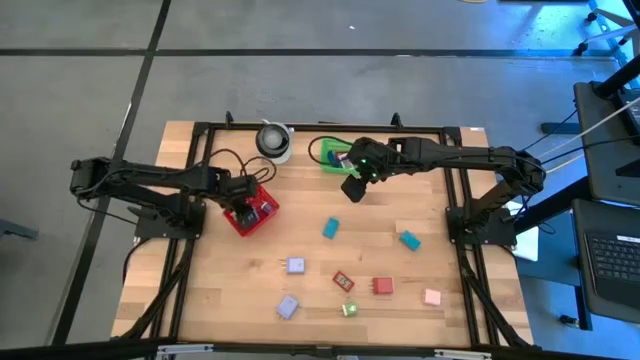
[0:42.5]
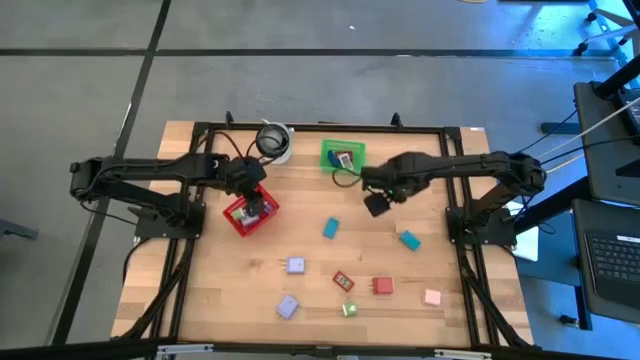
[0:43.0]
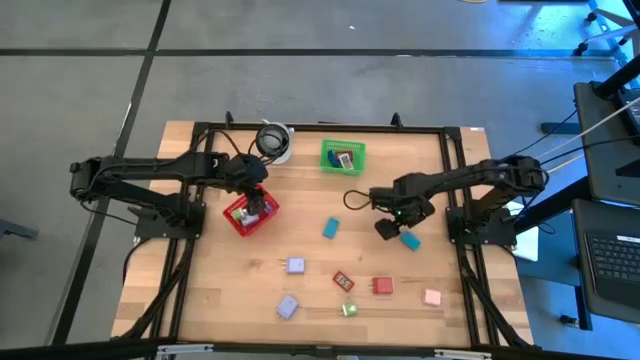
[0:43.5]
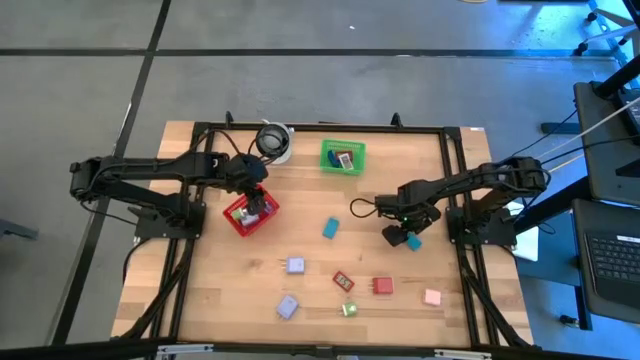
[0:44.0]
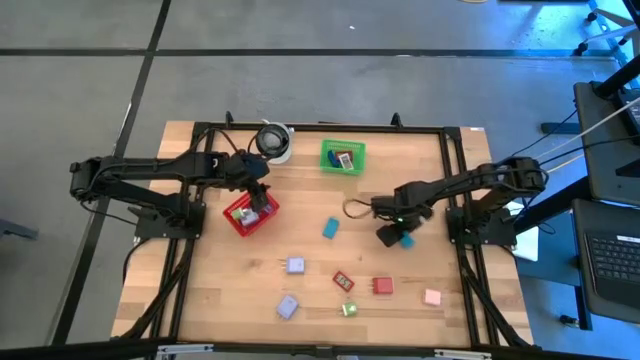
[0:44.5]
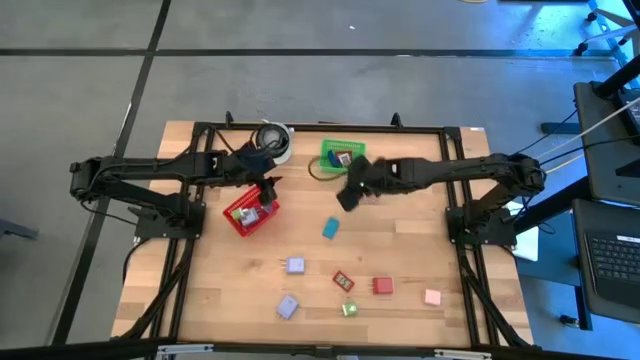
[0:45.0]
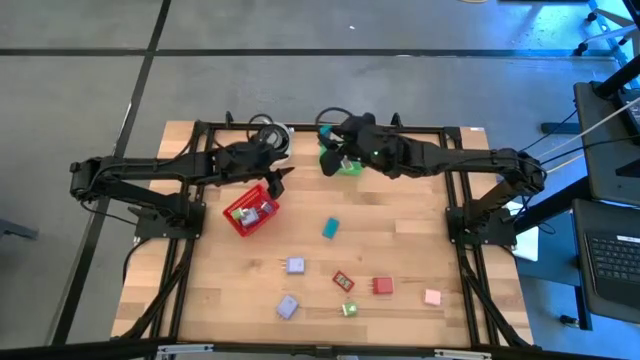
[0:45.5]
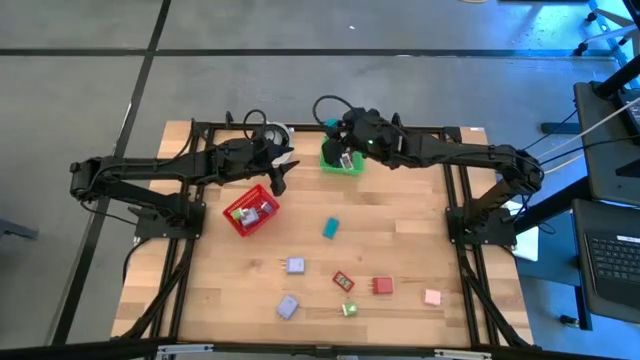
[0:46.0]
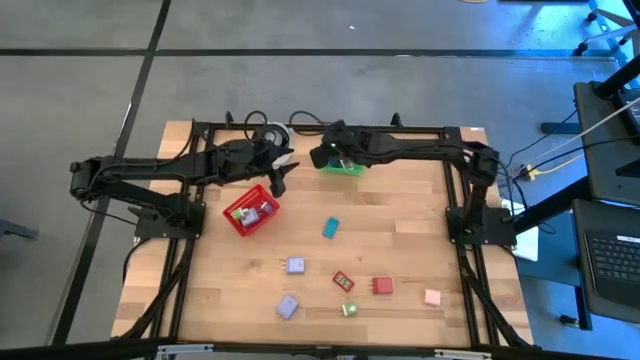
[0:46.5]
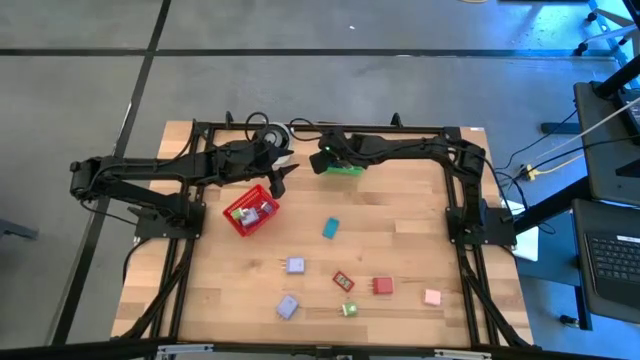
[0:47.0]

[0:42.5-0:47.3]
Task: Pick & Place Office items
Put the right light blue digital clock into the green bin

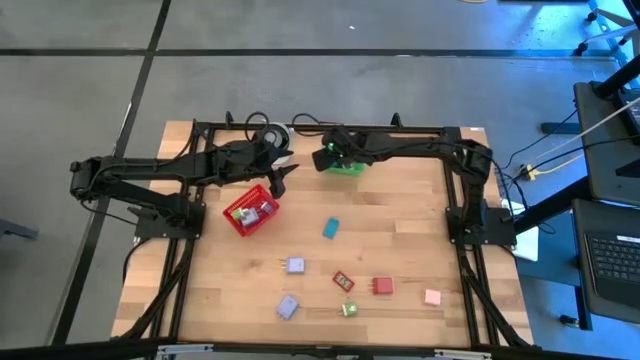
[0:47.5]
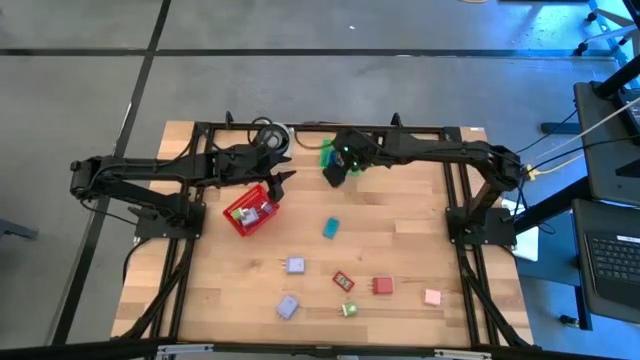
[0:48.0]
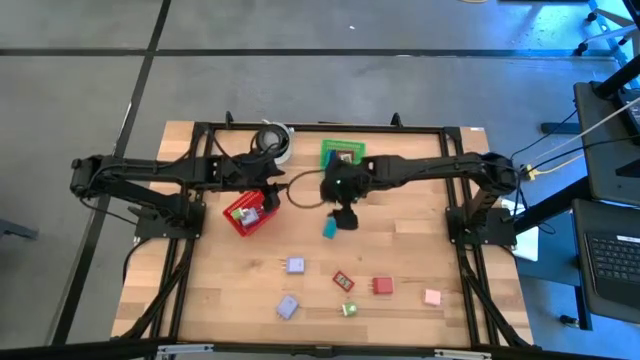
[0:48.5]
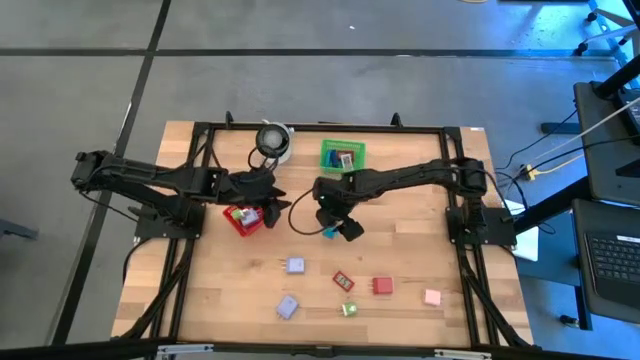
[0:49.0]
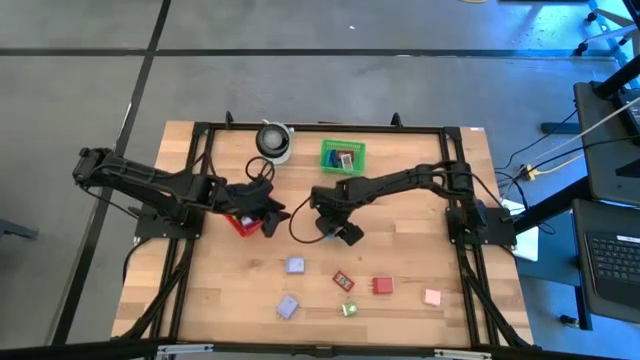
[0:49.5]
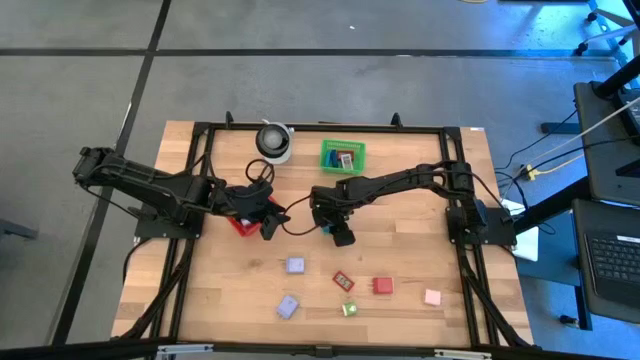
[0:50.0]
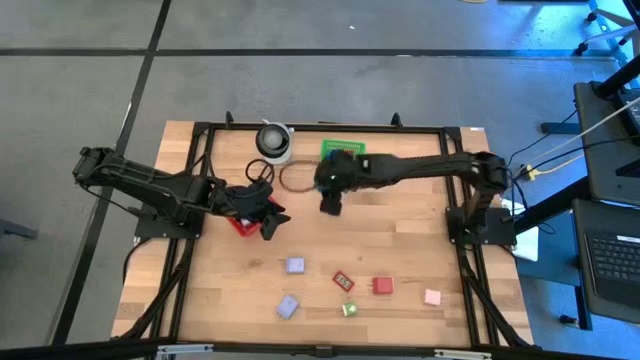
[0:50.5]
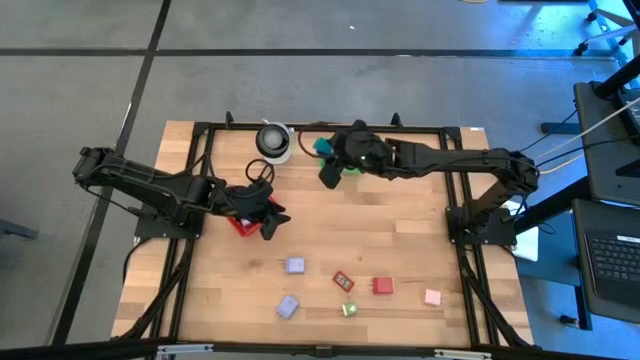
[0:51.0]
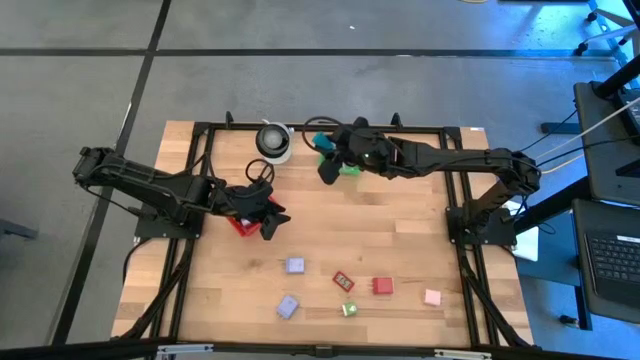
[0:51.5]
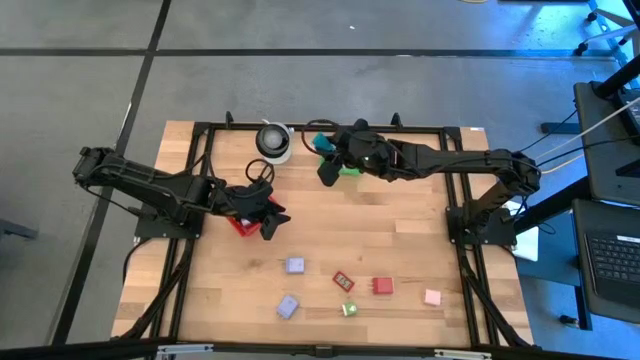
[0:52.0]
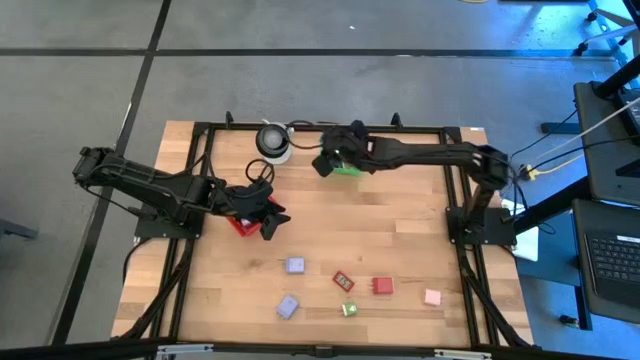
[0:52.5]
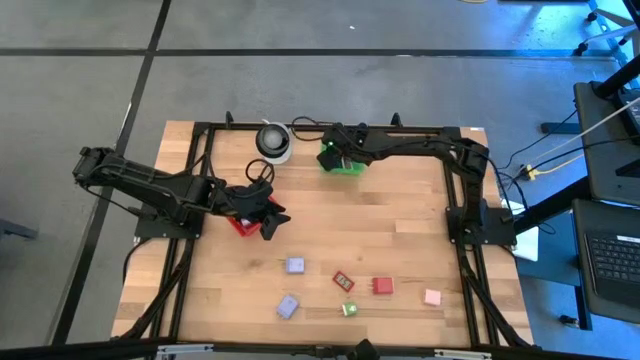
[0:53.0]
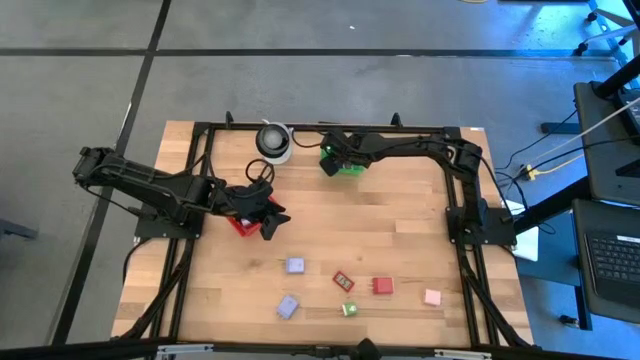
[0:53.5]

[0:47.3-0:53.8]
Put the light blue digital clock into the green bin

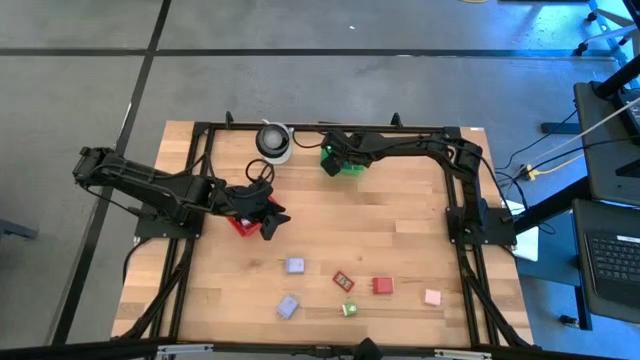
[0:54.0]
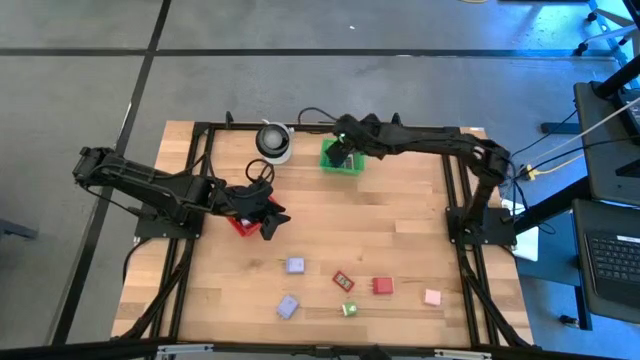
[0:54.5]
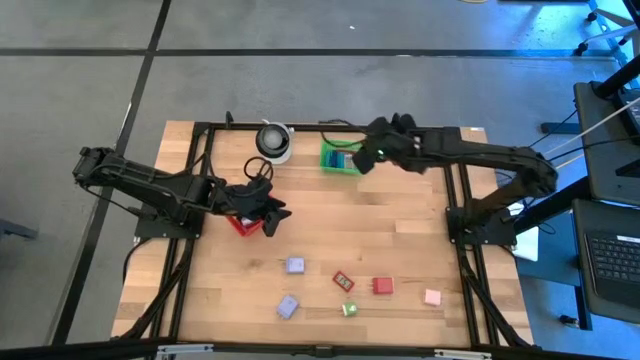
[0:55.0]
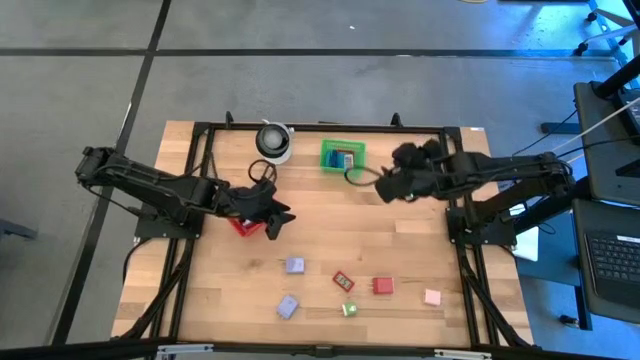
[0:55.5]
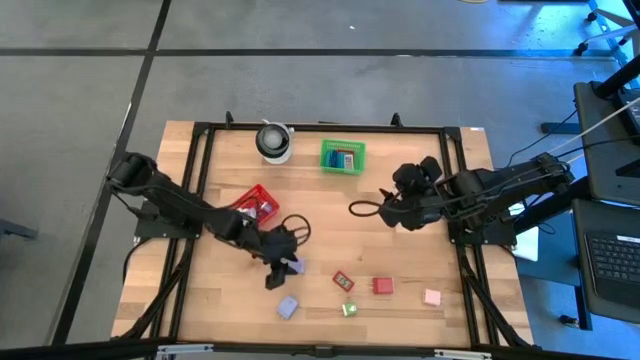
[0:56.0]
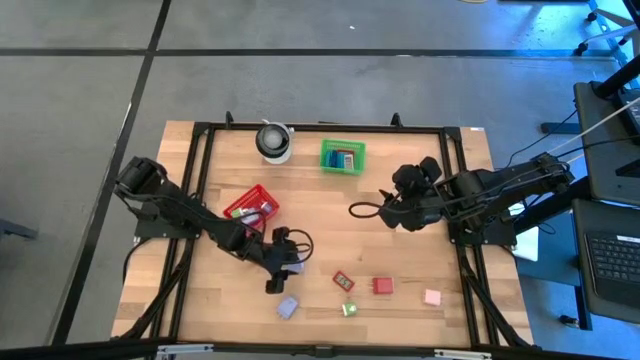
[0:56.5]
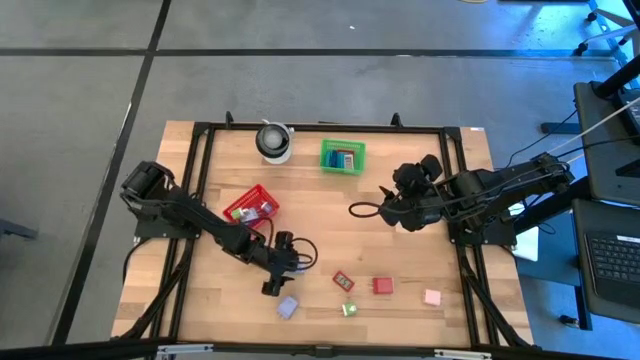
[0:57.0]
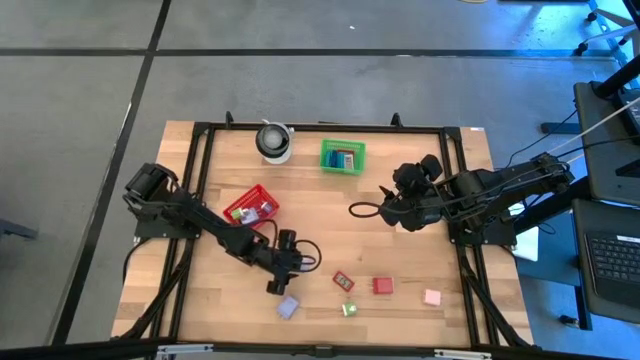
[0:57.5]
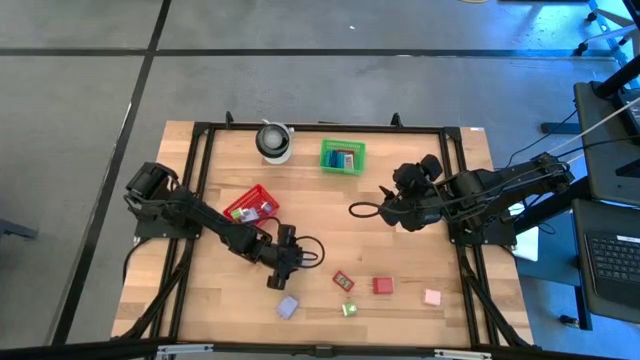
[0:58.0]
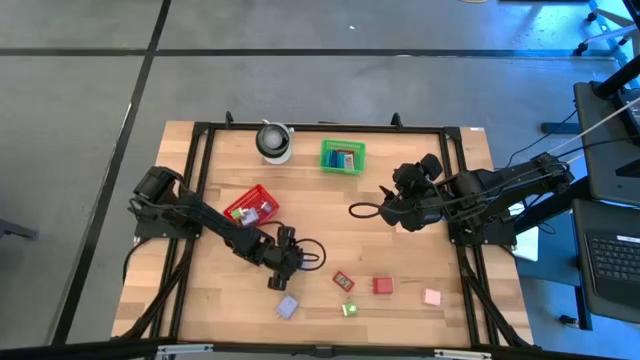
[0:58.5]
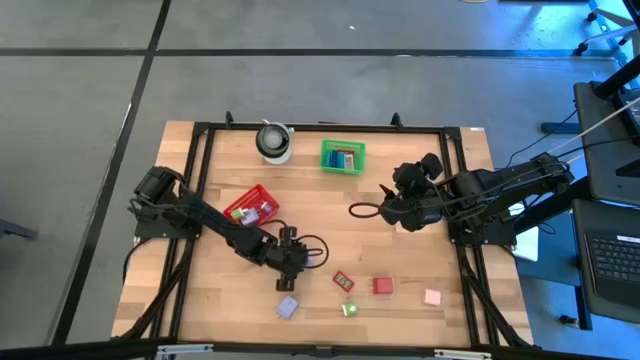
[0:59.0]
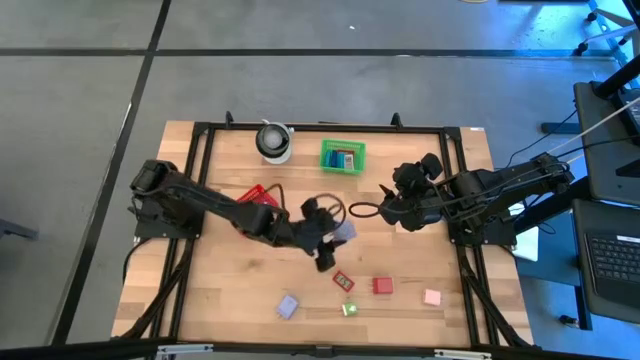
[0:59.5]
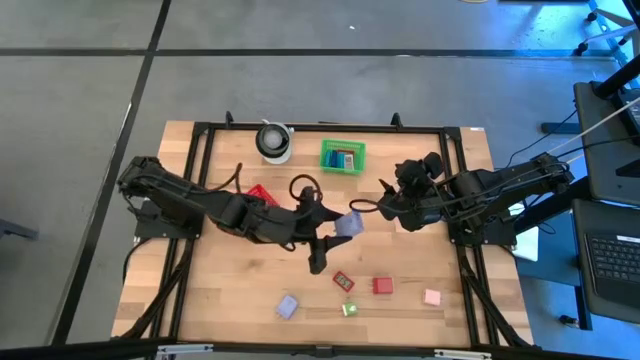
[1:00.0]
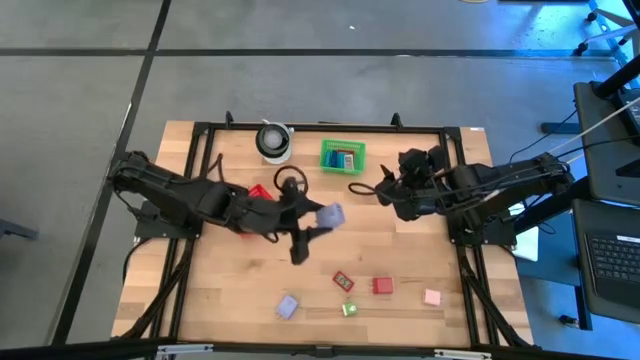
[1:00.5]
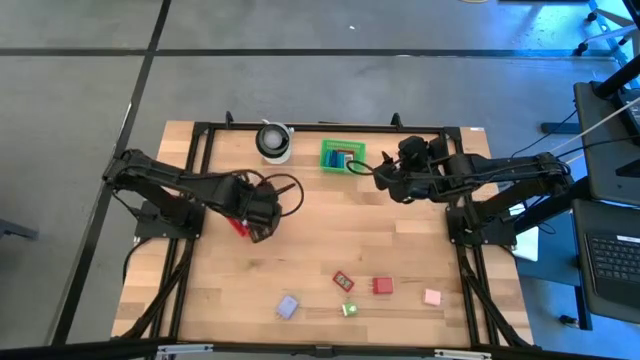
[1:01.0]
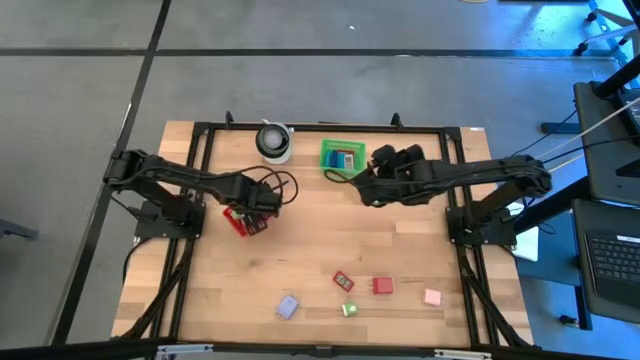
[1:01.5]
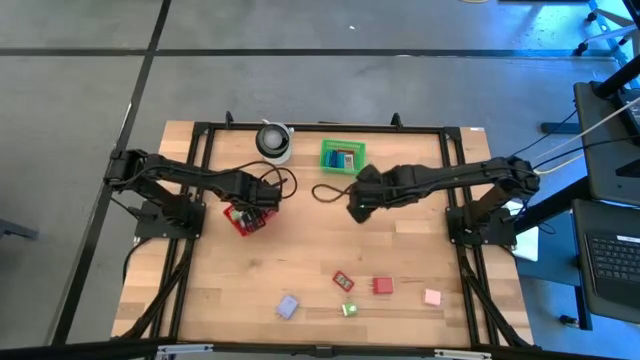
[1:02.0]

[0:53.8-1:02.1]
Put the top light purple charger adapter into the red bin

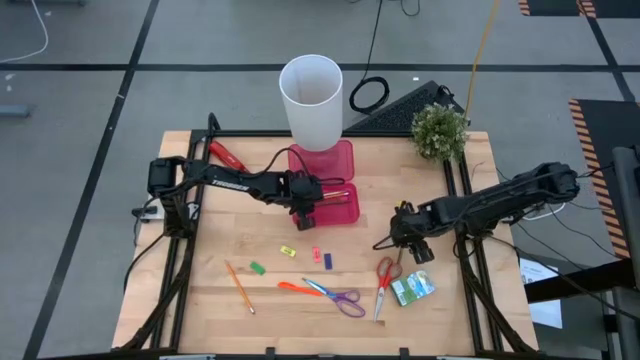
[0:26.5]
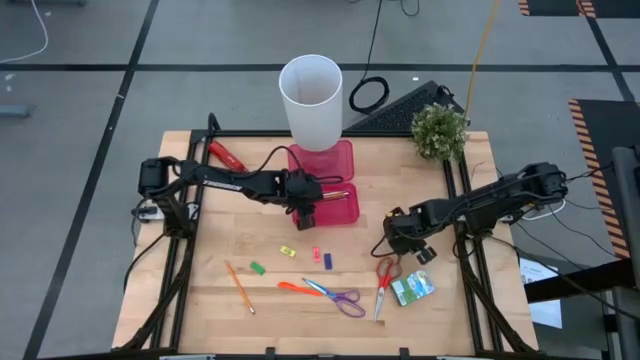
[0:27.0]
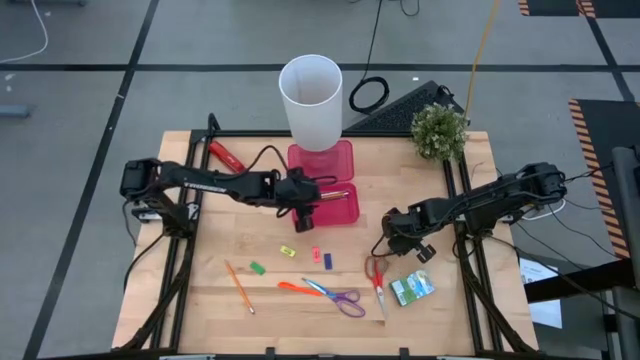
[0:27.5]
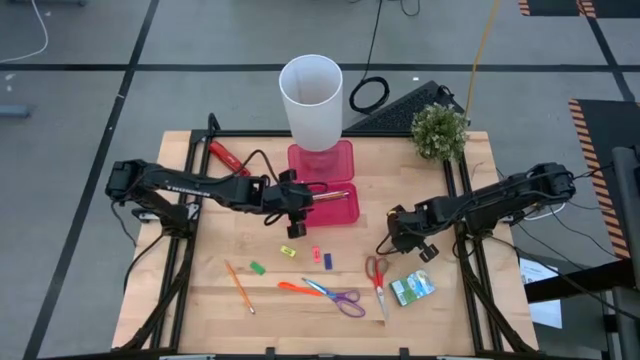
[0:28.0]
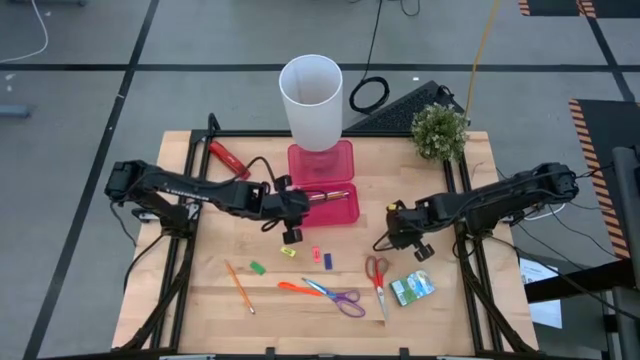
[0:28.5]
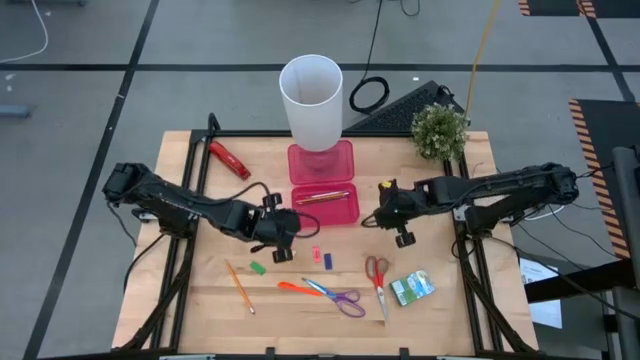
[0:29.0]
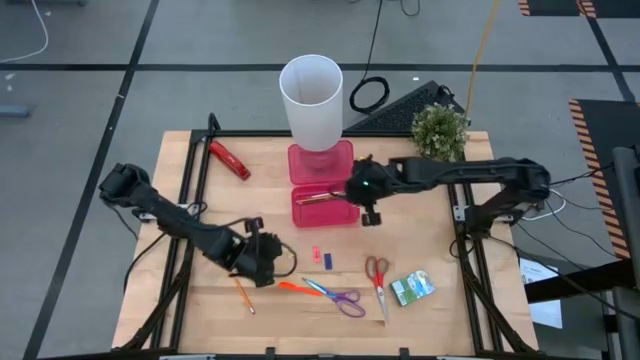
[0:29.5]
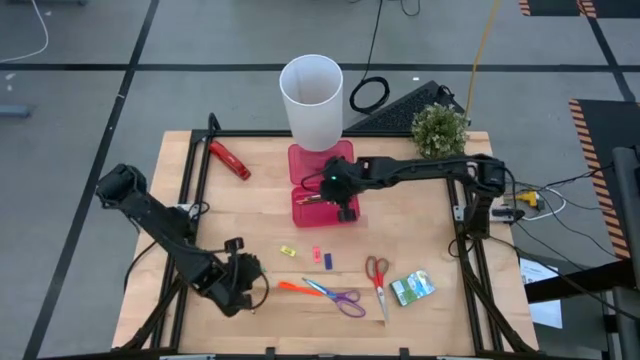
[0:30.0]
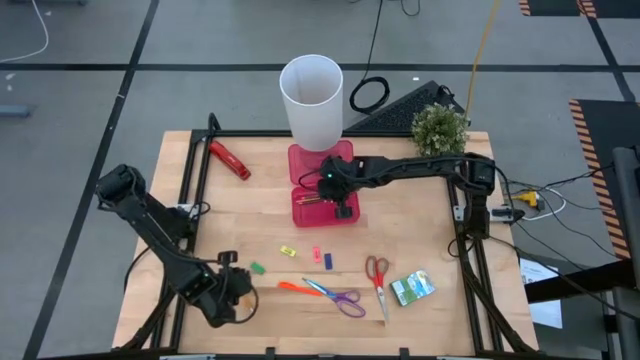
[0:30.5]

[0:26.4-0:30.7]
Task: Pack school essentials
Put the black pencil into the pink supply box
